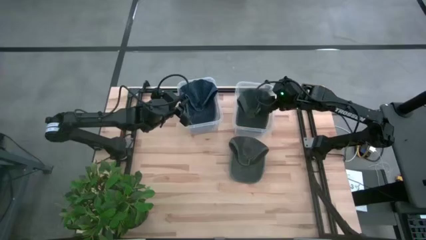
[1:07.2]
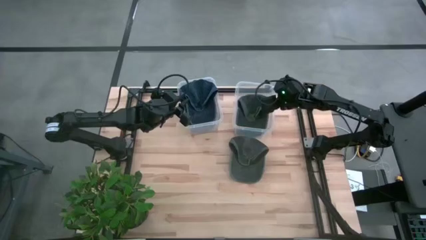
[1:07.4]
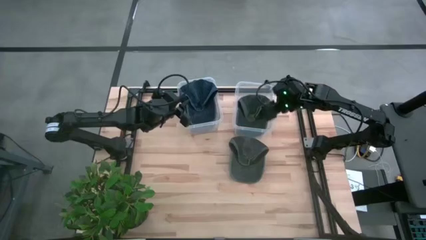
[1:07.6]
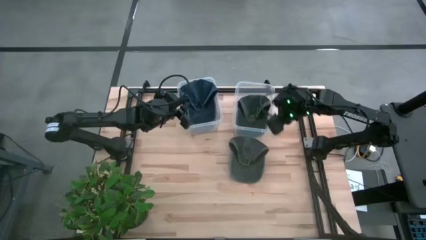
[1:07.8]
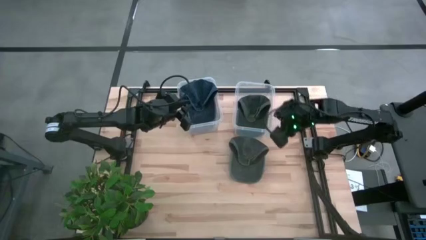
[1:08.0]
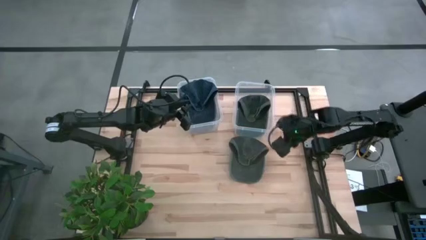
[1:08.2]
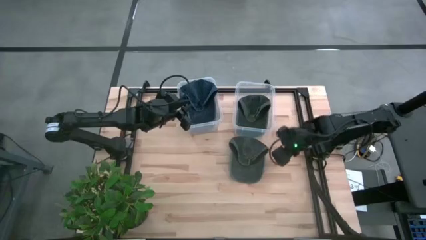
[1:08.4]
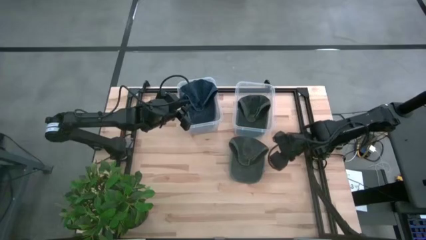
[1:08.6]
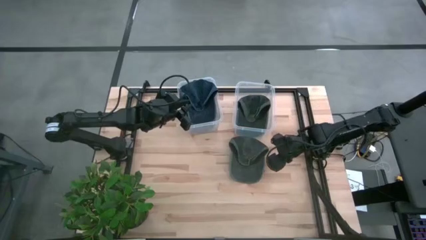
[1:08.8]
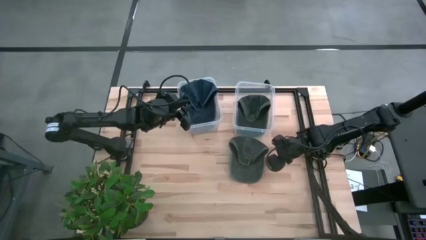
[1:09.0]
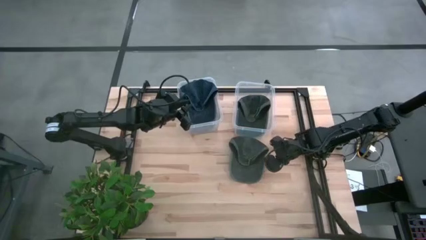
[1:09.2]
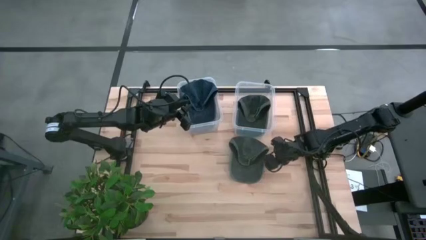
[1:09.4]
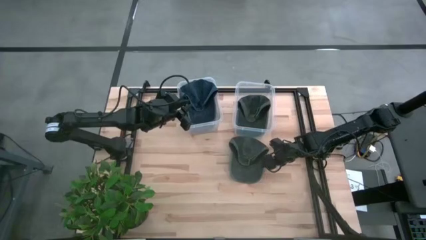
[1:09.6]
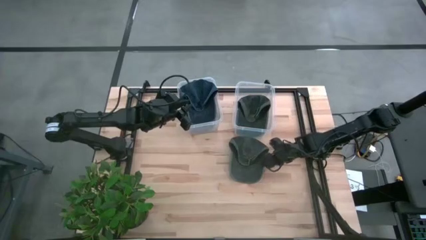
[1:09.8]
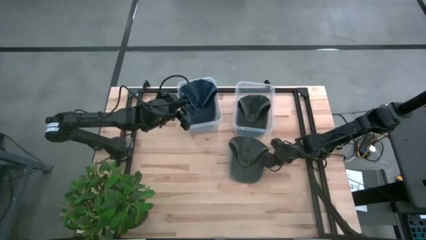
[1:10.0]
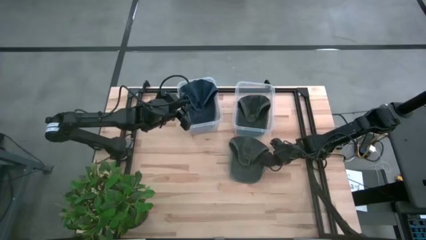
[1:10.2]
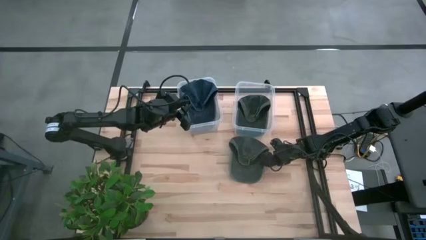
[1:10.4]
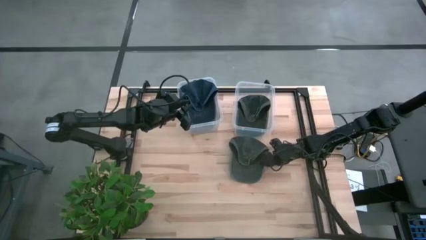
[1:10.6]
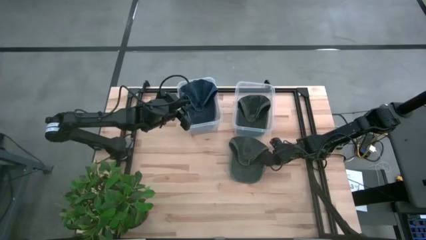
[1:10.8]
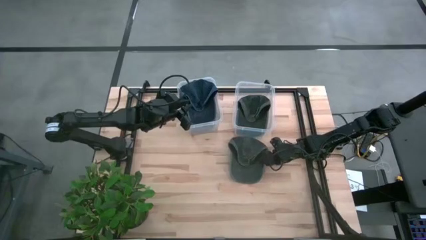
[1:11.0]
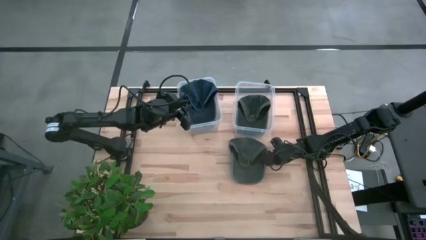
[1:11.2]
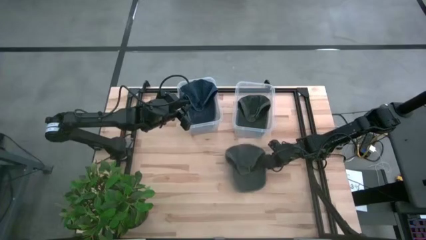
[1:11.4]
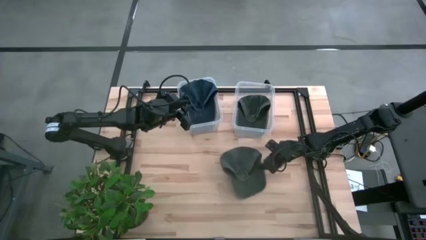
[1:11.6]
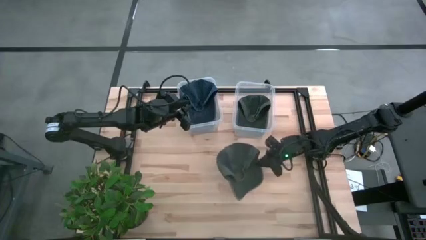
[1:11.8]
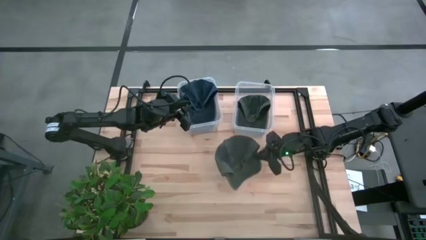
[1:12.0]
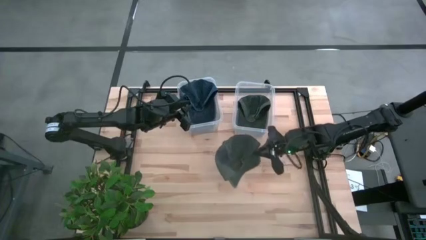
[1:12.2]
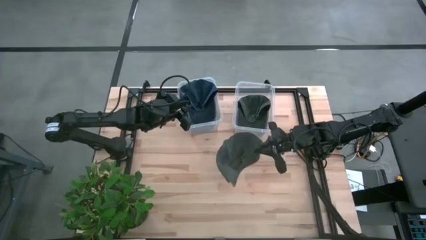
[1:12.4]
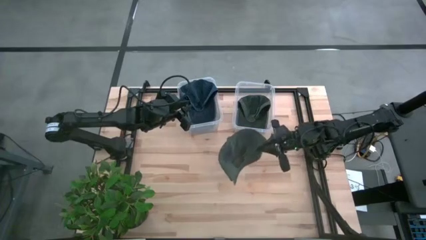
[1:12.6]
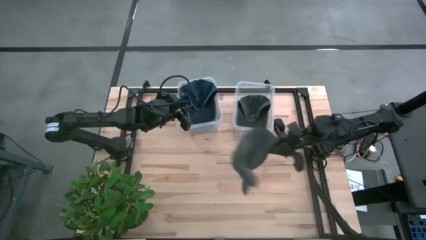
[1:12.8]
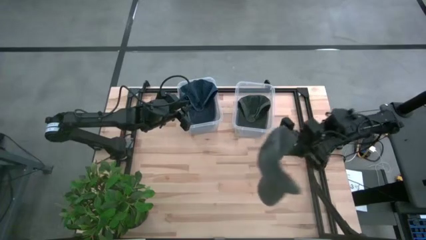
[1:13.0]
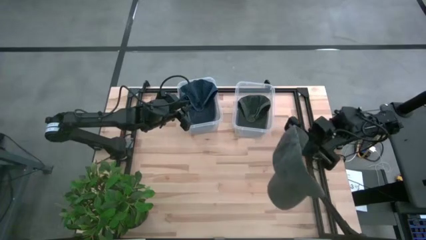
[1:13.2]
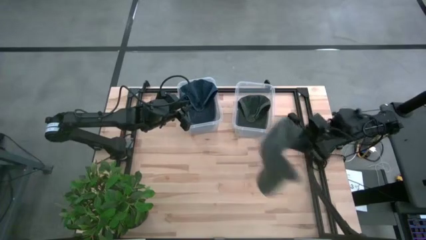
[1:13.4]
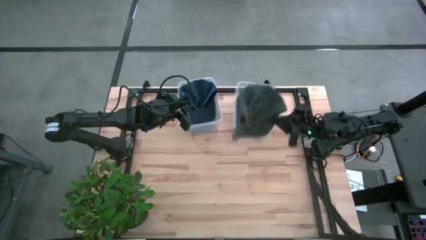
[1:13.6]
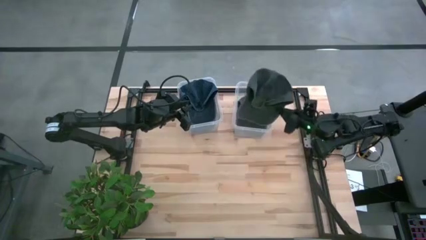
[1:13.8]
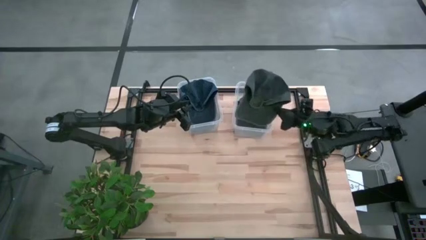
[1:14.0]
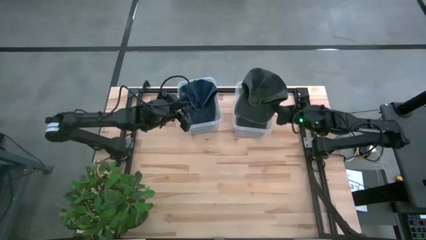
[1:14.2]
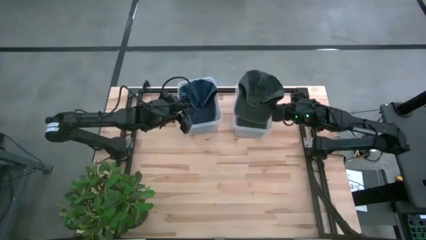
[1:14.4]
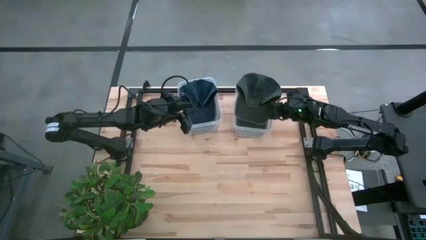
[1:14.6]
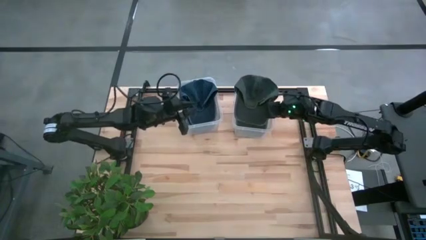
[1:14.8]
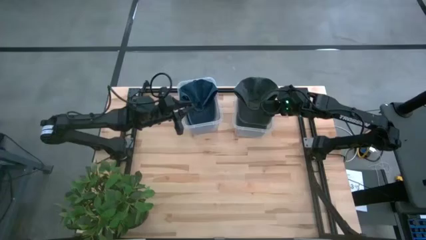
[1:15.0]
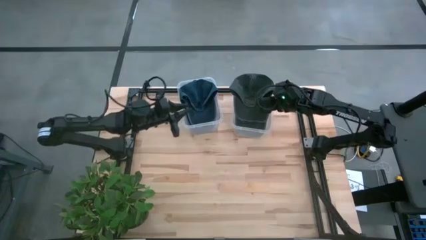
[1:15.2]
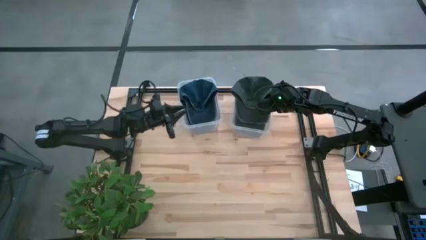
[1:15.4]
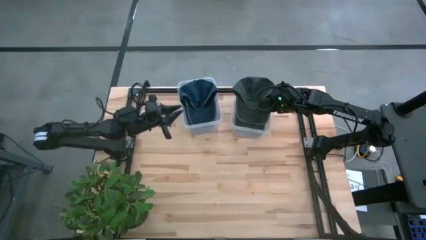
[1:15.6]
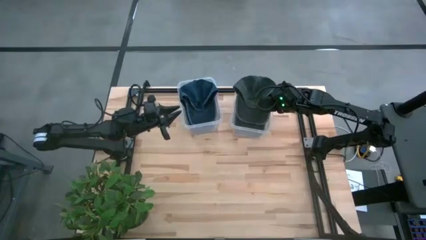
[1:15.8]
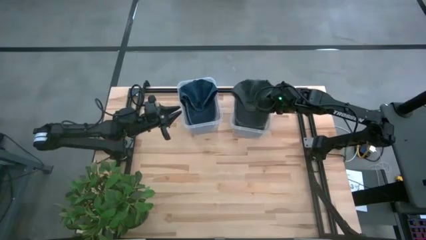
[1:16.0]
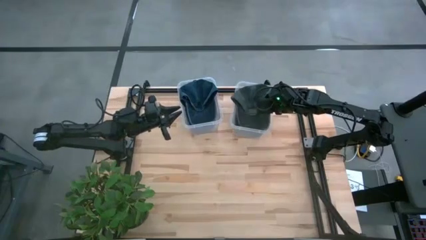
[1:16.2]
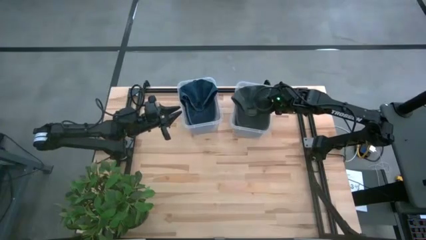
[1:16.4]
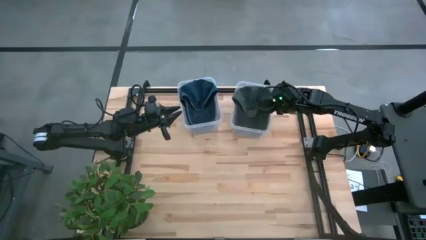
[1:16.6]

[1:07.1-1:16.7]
Task: Pick & Place hat
Put the black cap into the right transparent bin

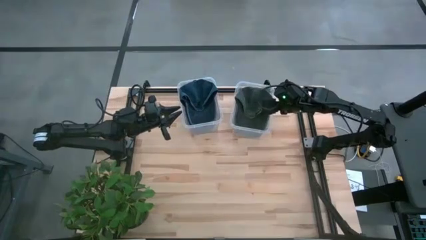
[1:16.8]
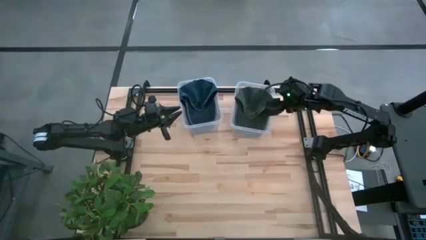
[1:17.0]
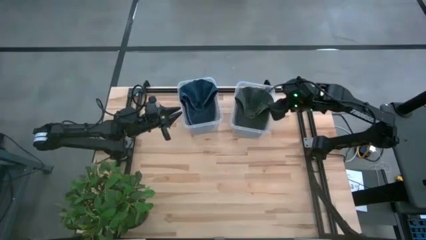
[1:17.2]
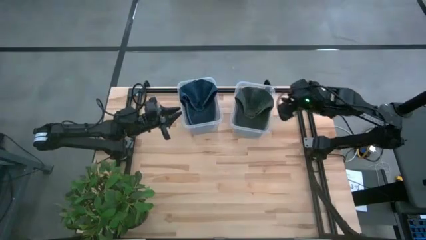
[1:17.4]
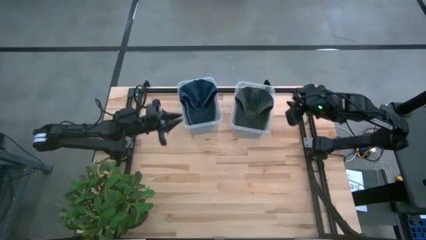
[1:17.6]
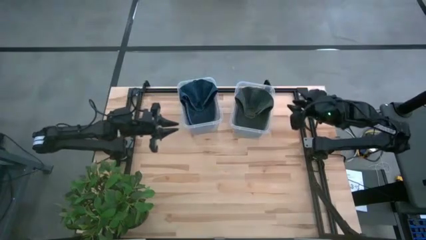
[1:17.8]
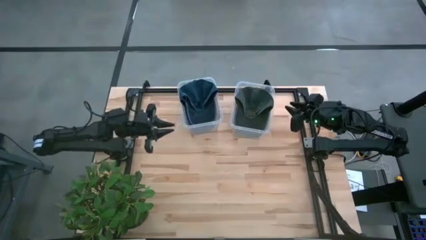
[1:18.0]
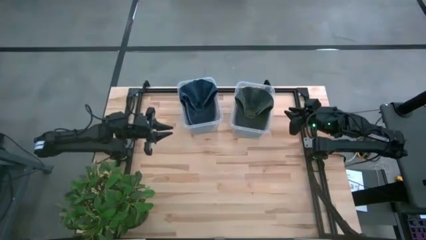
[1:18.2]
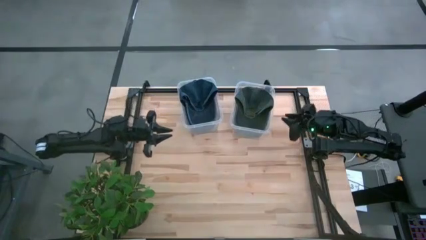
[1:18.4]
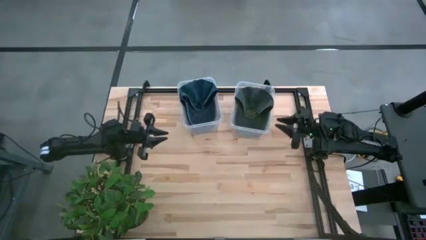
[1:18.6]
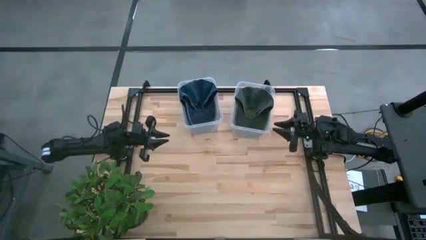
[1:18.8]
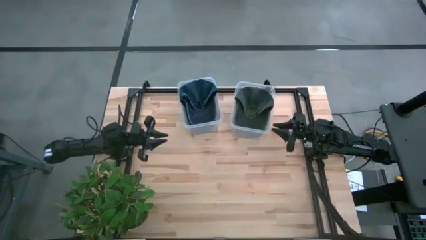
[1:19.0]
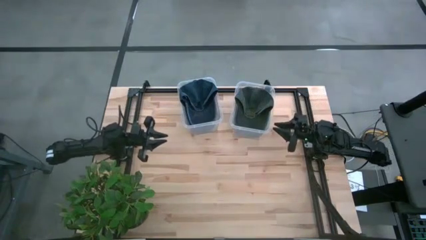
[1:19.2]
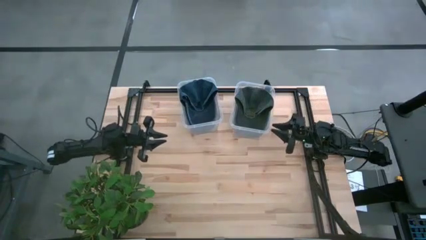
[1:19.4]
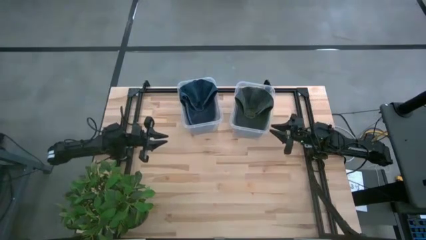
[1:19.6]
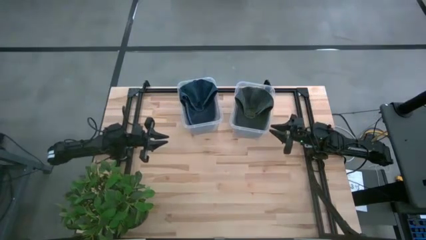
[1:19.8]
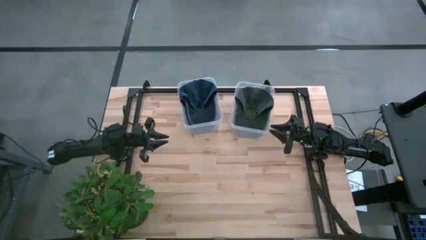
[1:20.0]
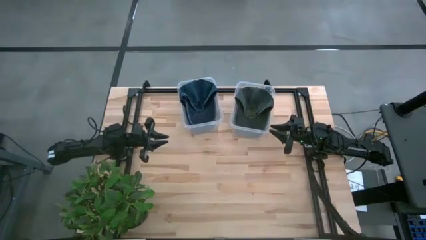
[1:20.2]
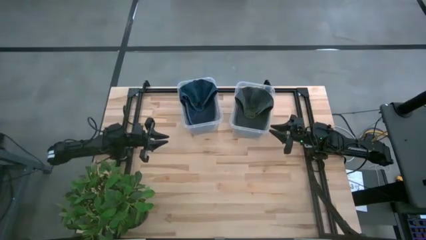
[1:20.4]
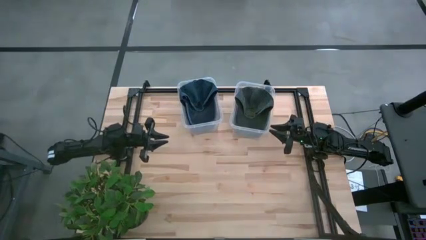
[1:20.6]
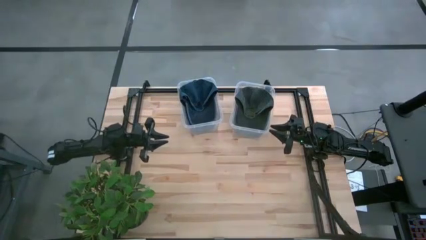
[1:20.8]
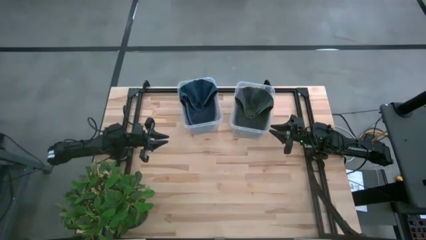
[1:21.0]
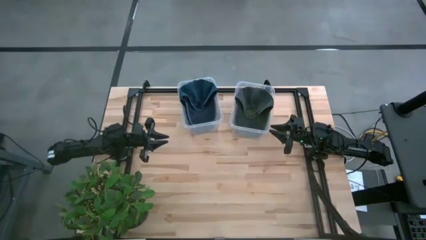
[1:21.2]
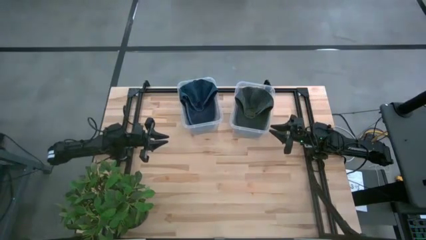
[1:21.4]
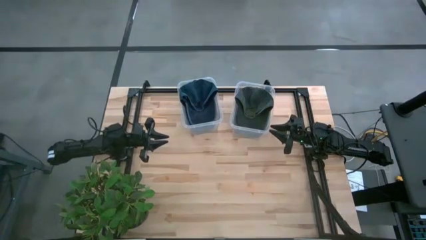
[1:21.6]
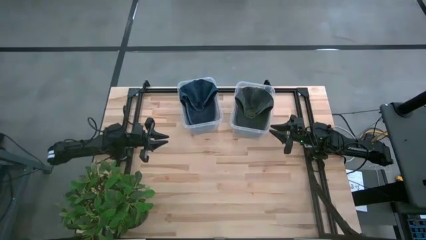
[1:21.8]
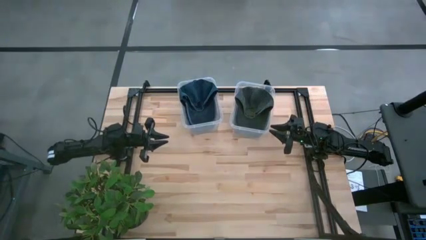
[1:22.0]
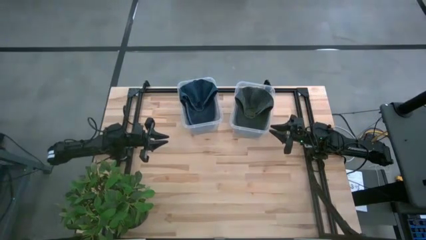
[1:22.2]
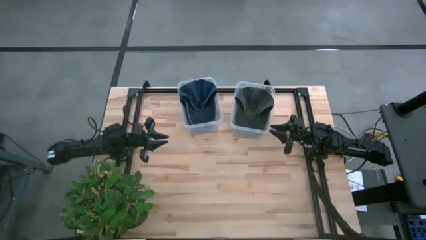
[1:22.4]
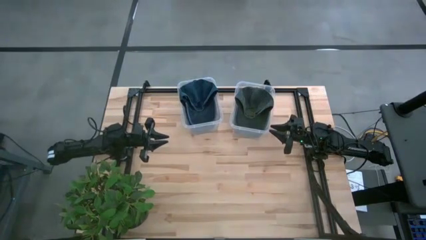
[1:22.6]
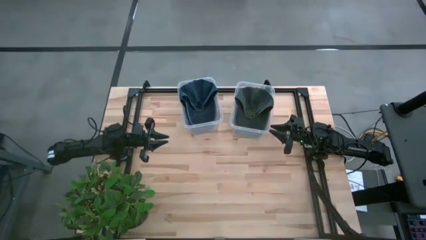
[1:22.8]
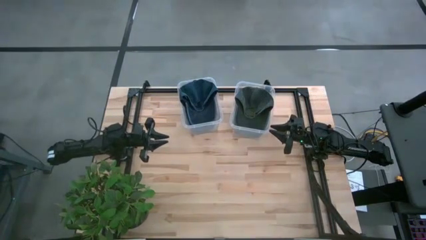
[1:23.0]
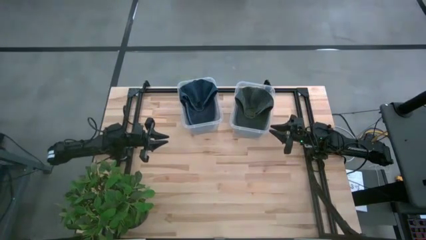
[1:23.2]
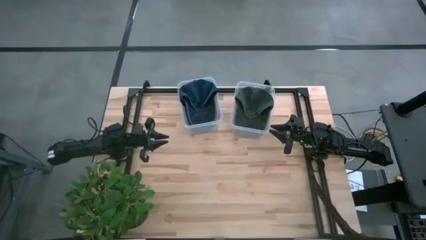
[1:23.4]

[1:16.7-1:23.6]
Return to Home Position
